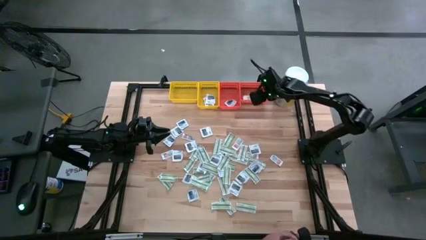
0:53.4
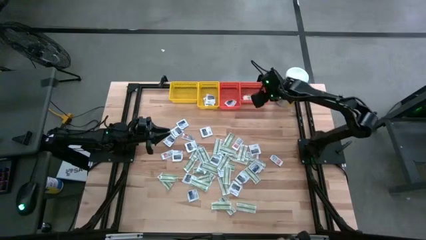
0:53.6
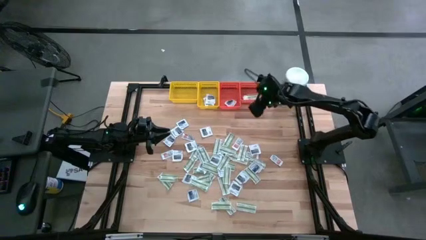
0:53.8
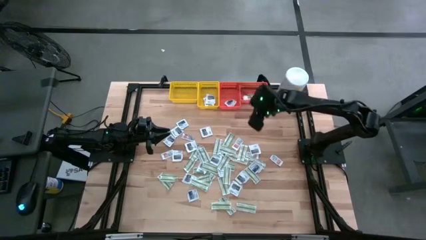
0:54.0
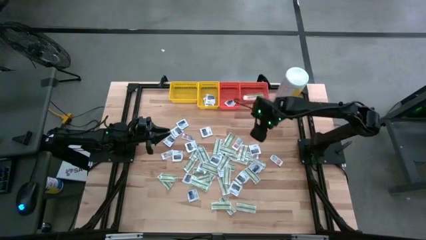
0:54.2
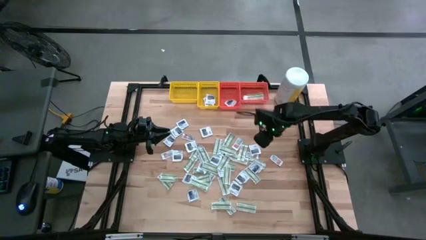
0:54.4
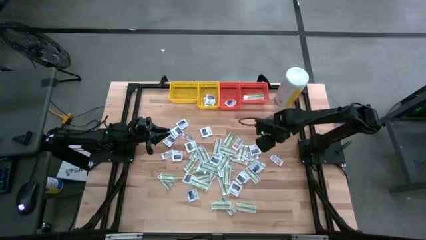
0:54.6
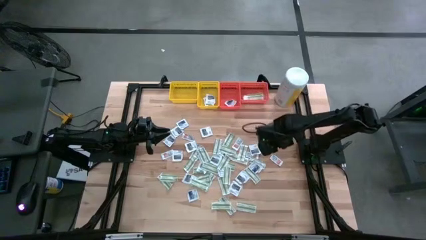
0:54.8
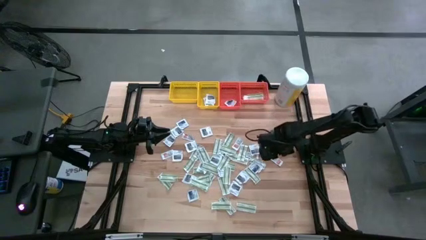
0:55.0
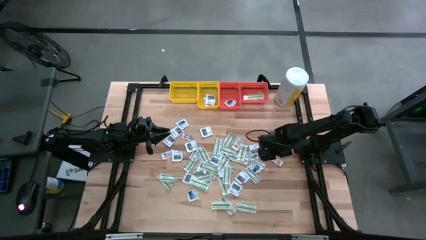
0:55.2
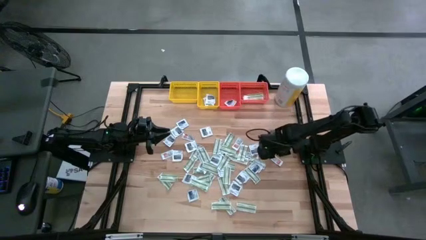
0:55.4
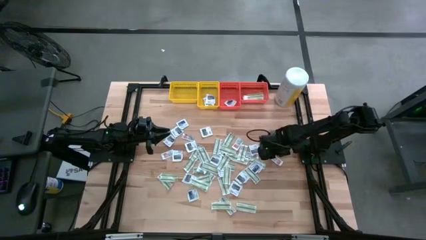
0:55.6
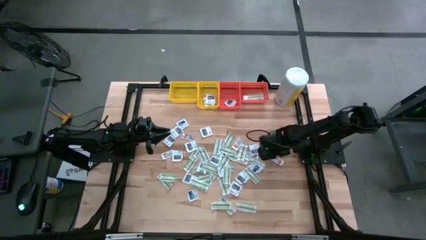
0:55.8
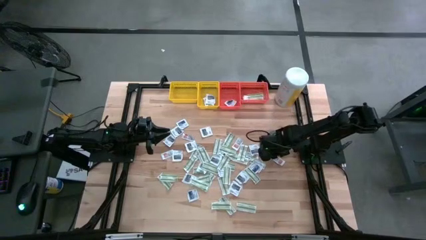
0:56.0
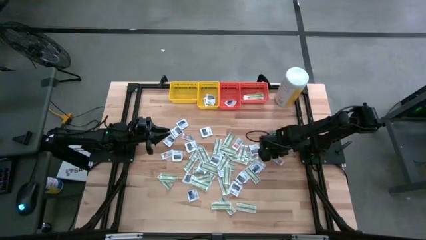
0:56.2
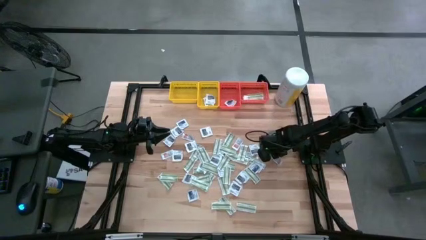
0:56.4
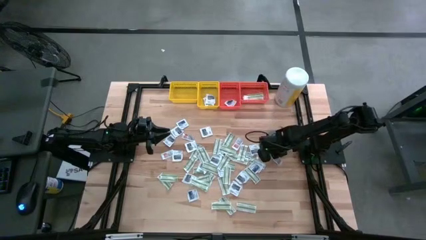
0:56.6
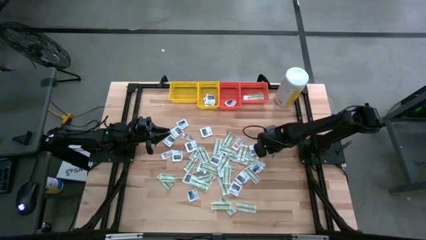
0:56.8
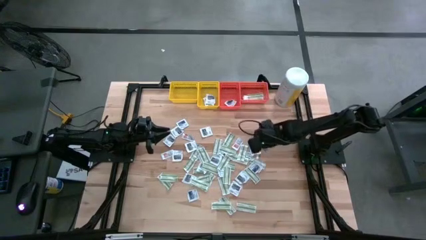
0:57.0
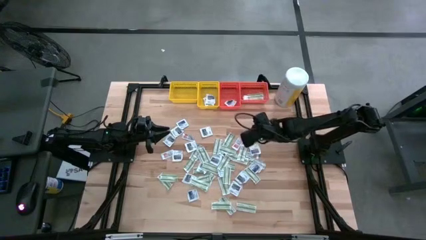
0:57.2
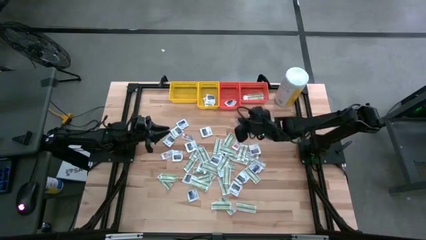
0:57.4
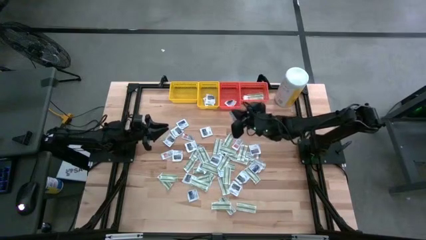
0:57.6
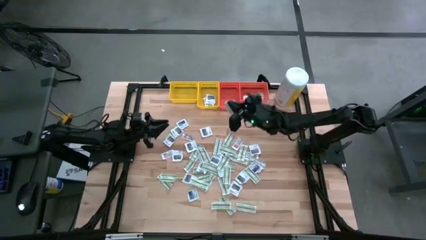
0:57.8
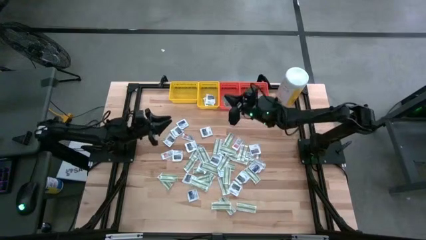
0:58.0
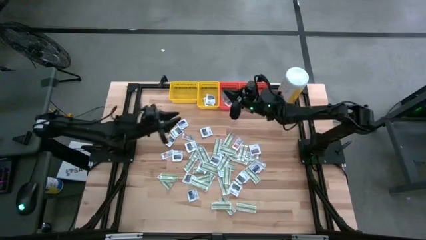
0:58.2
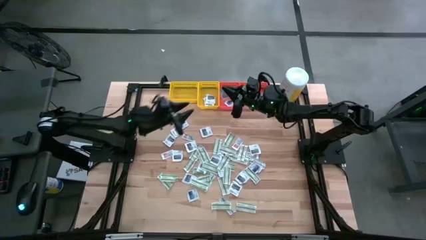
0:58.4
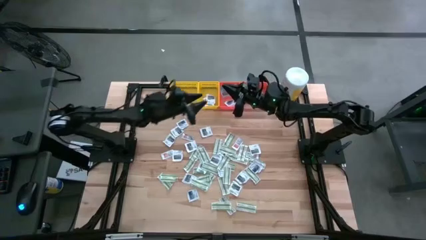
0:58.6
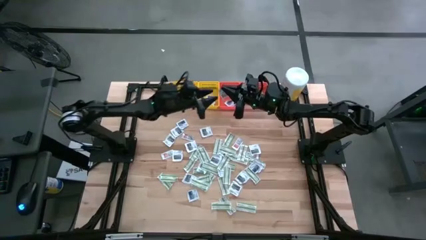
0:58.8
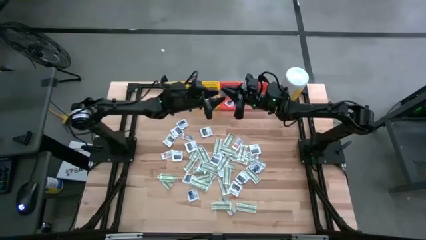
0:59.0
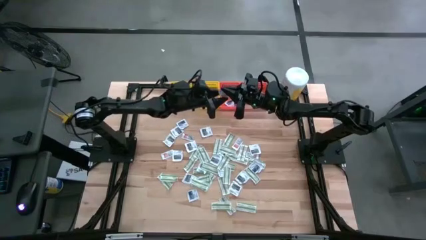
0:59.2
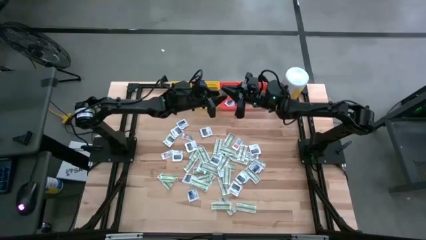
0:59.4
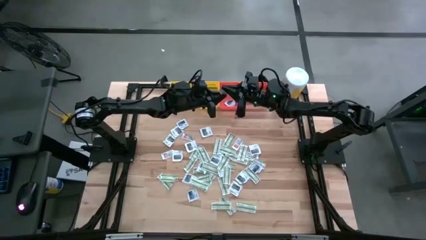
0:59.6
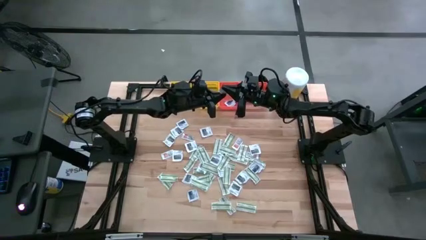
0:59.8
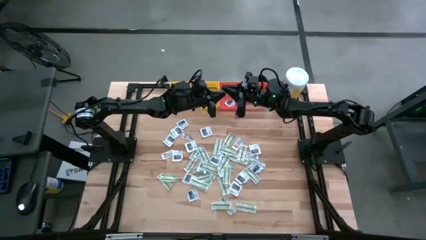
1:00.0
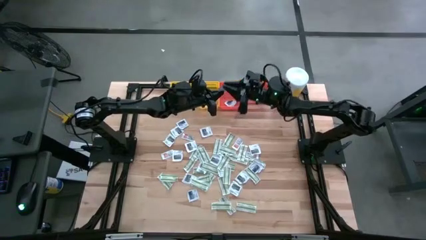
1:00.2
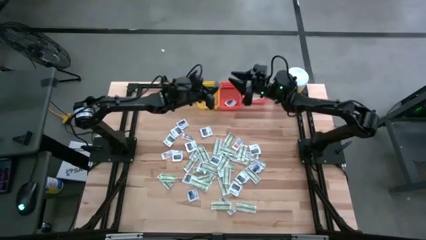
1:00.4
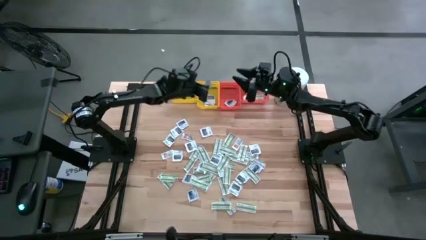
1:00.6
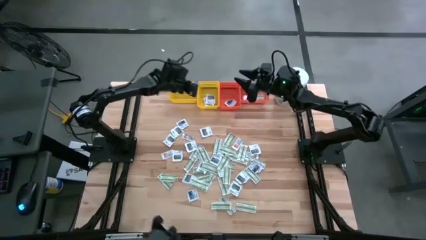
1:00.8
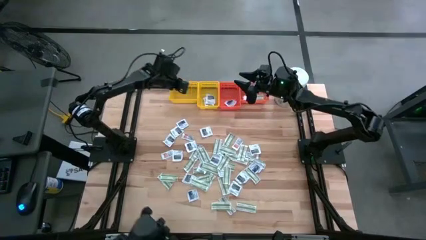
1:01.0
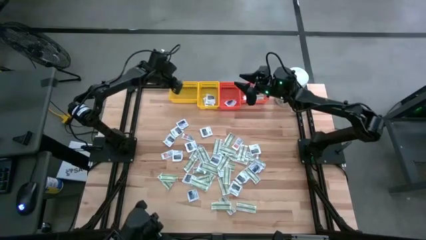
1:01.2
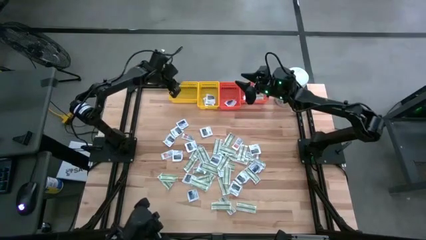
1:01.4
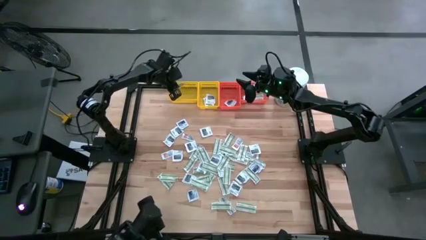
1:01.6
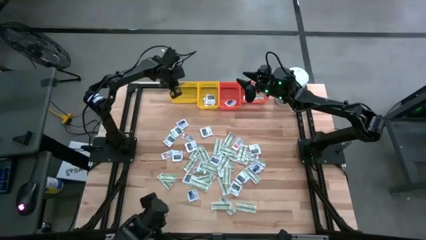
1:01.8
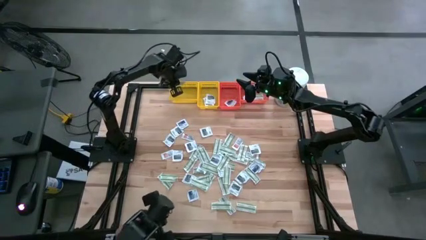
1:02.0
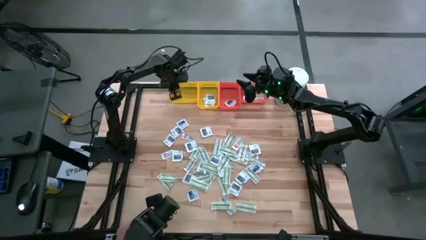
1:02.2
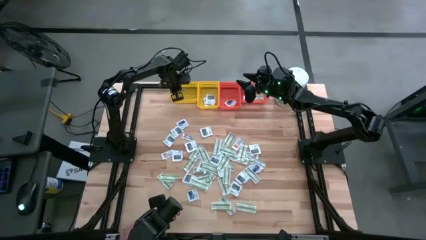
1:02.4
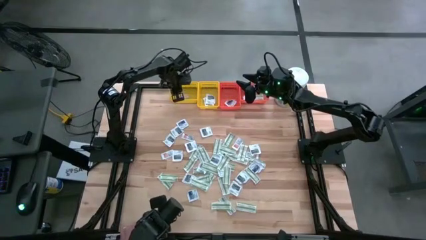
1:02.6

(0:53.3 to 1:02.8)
Task: Pick & Place First Aid Supplies
Put the orange packet into the left yellow bin

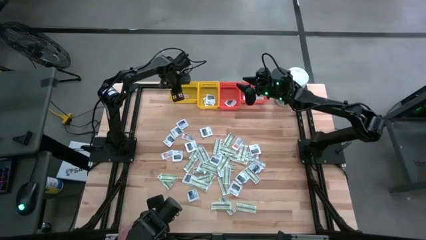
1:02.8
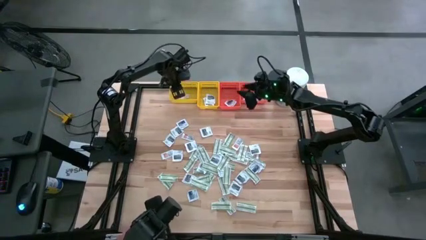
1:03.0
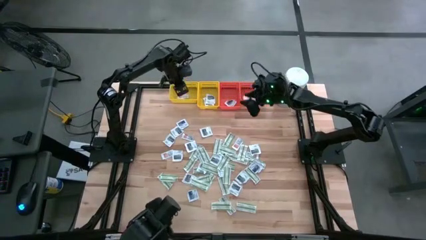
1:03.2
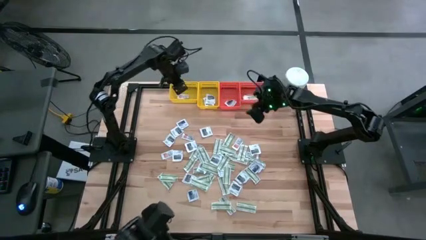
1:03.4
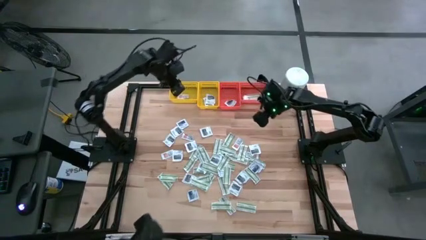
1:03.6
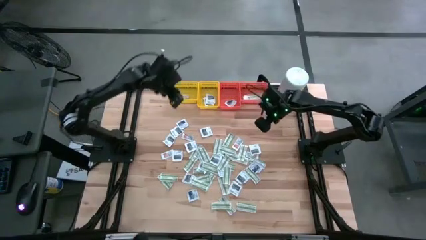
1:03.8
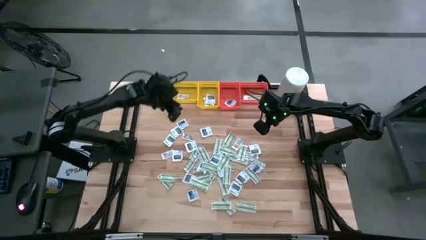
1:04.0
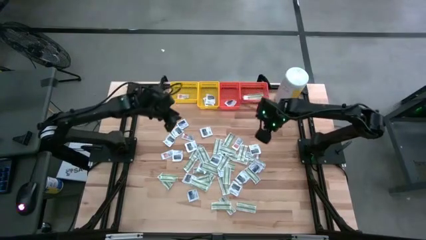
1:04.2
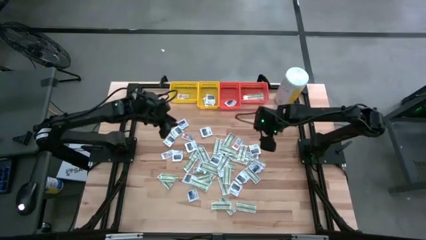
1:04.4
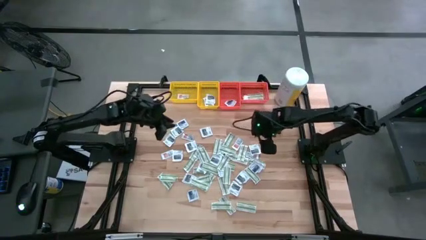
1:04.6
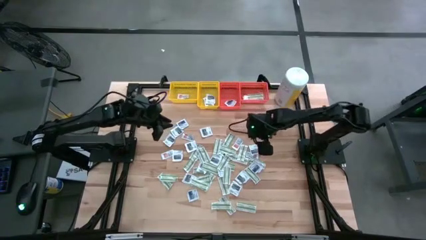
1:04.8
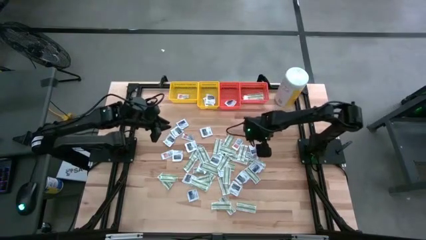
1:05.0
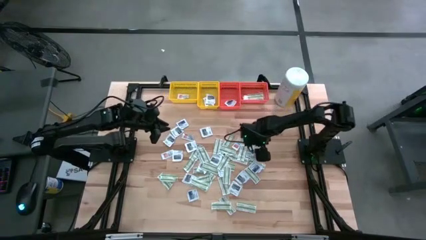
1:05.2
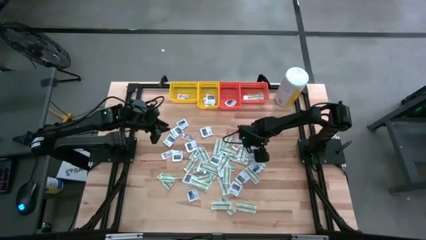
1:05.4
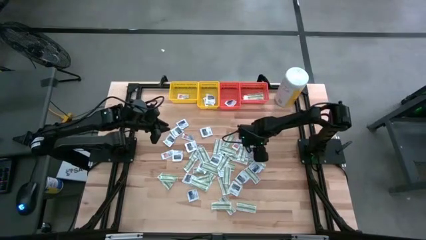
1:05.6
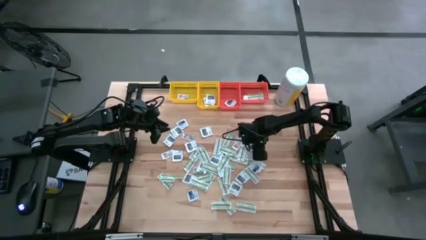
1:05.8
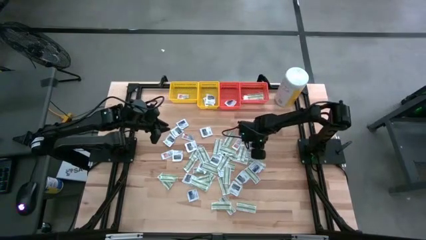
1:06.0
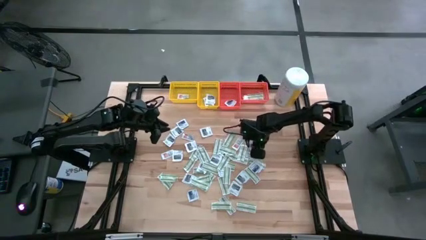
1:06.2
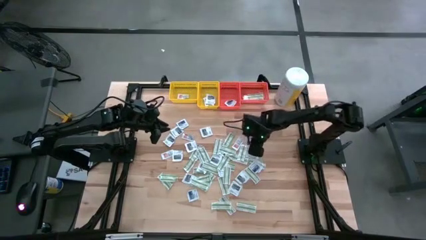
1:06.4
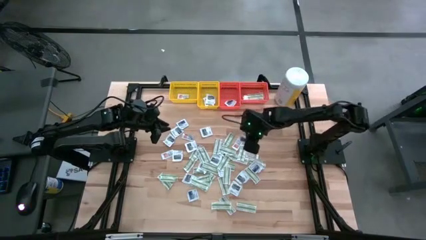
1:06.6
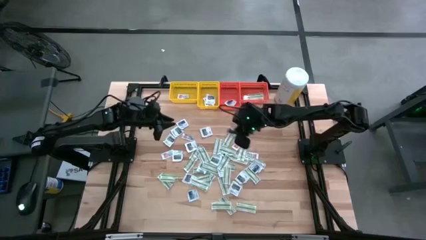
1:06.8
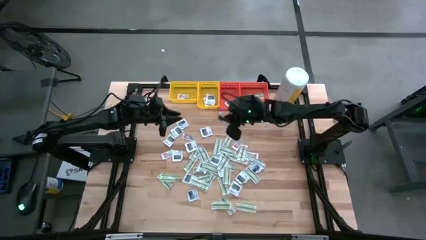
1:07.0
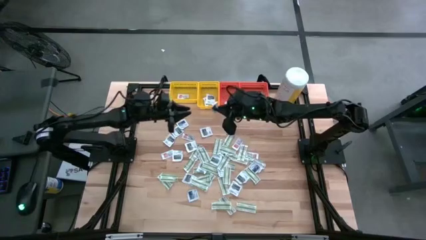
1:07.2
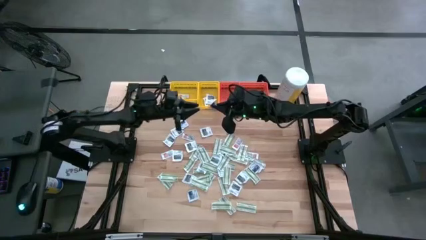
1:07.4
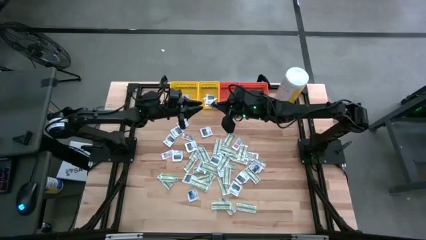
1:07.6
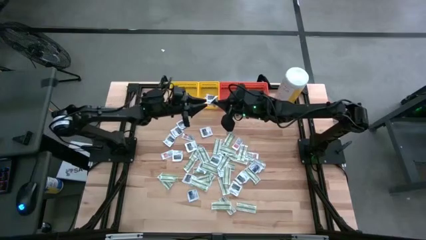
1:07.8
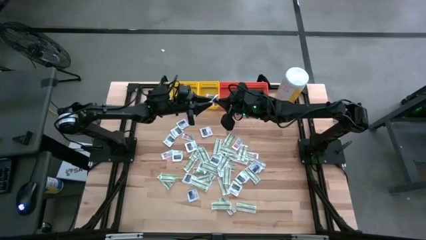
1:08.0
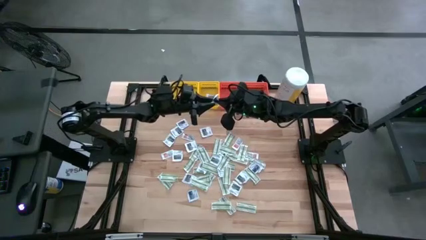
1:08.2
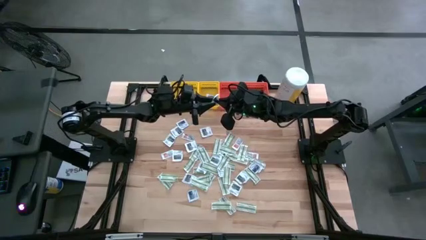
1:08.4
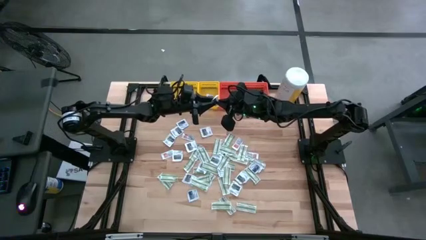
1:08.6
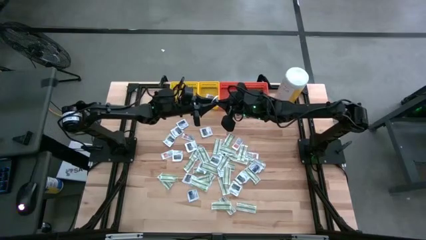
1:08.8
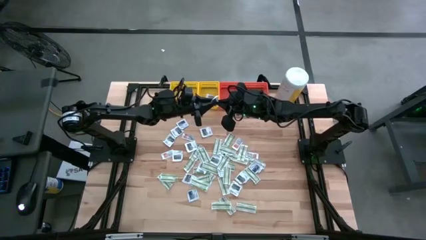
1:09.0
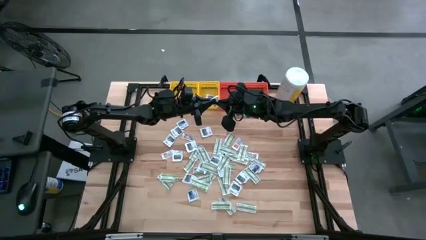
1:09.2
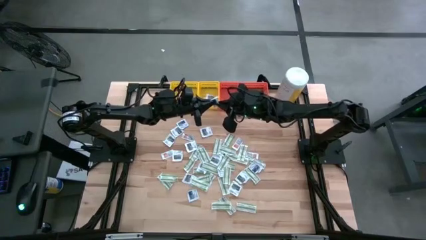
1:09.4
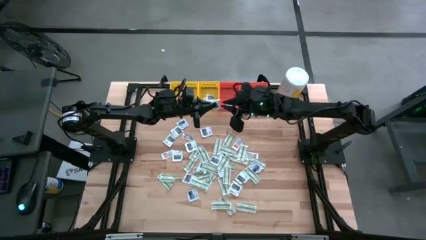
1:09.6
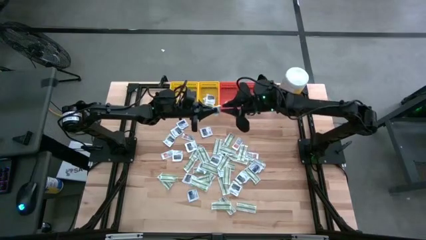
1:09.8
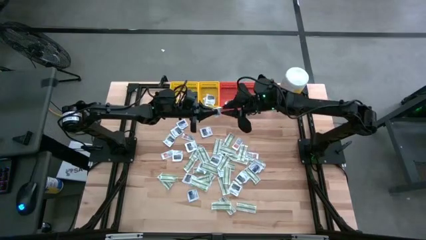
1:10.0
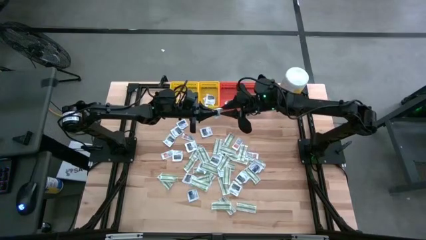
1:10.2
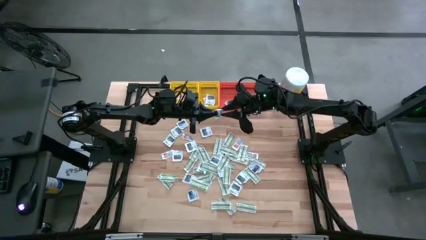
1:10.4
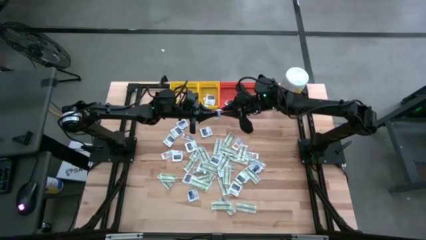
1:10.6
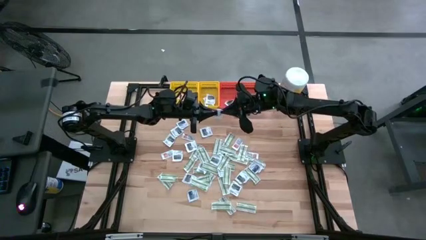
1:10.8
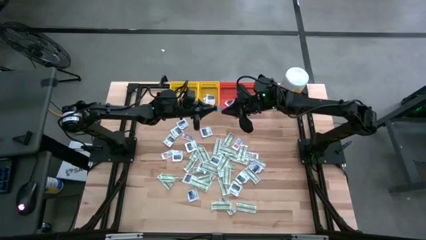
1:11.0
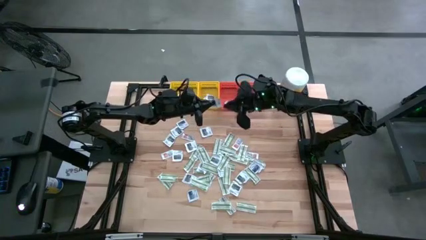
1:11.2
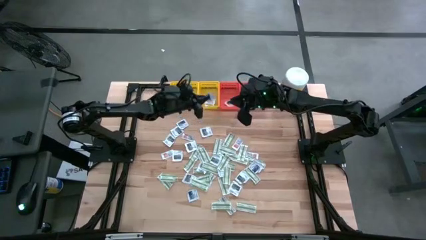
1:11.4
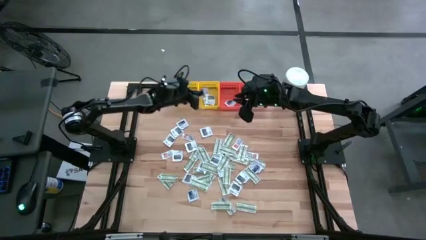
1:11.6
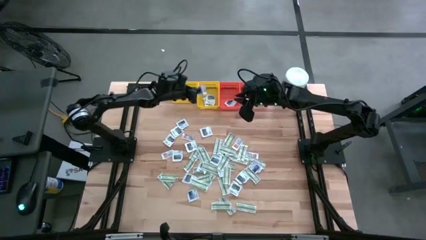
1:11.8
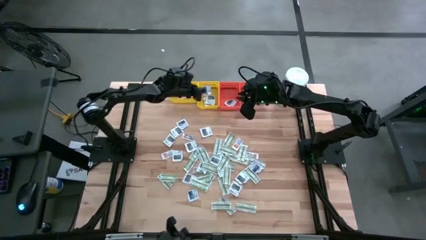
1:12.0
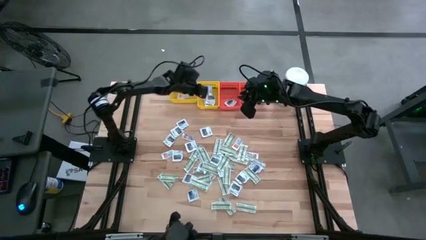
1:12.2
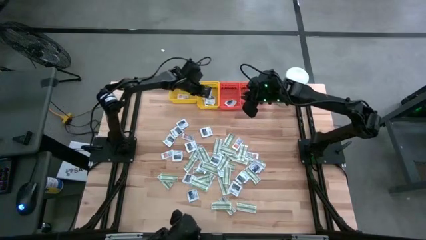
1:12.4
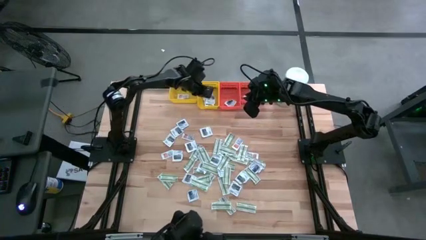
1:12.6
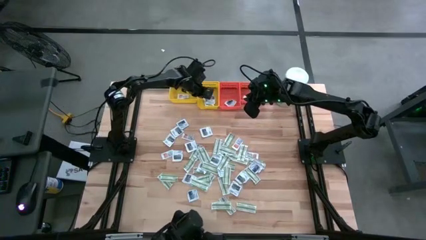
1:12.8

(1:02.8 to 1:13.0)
Put the gray packet into the right yellow bin
